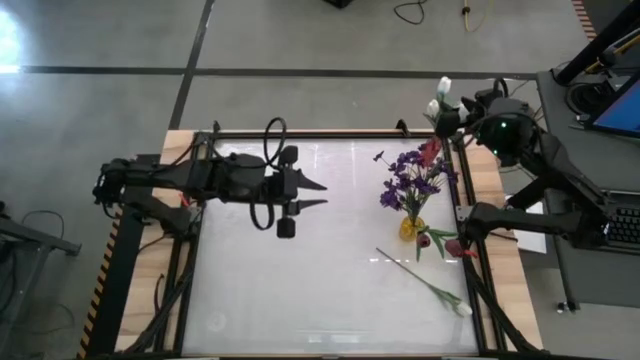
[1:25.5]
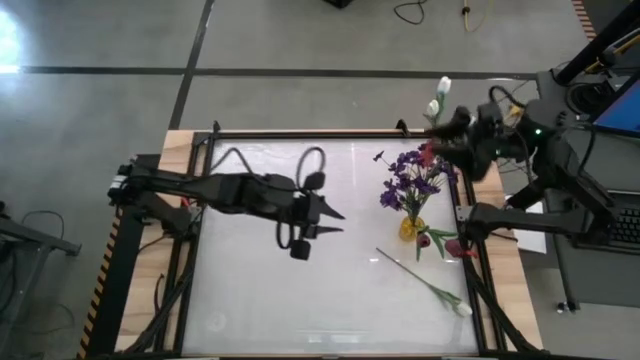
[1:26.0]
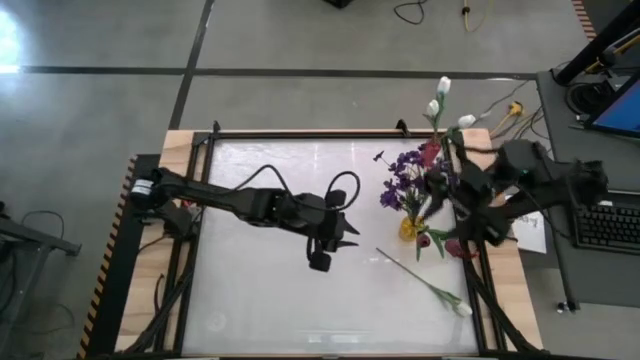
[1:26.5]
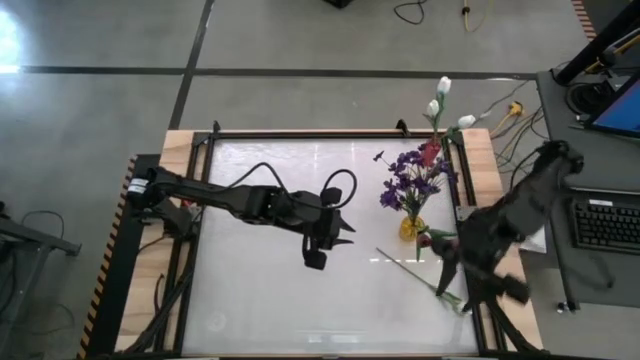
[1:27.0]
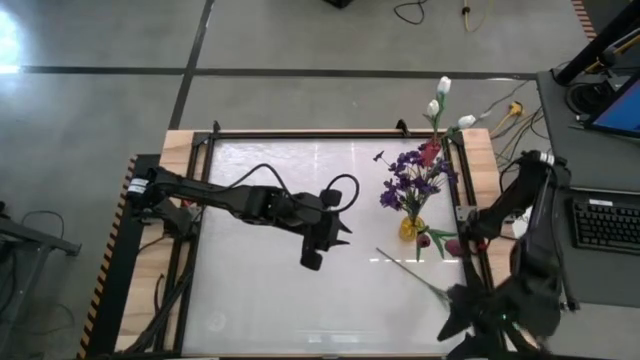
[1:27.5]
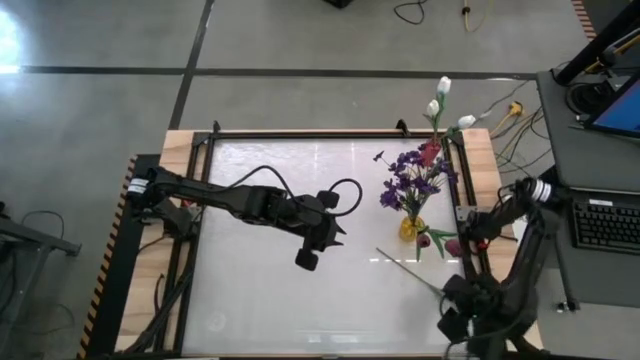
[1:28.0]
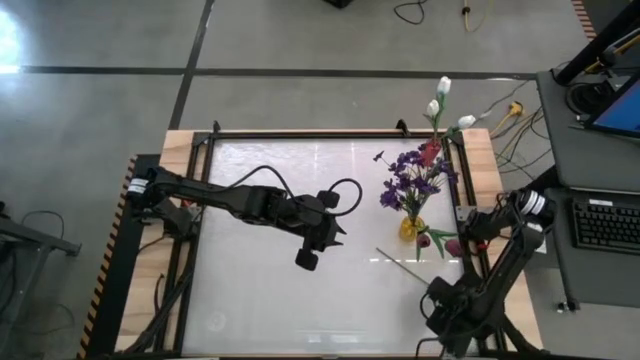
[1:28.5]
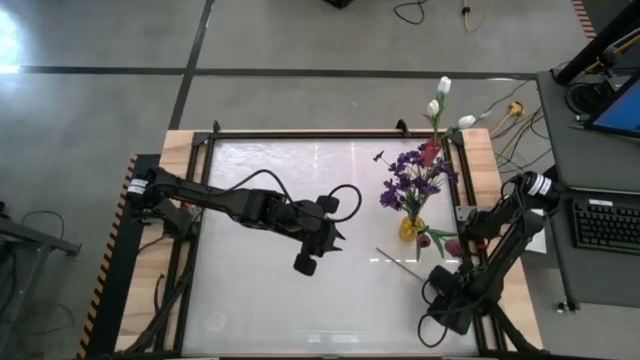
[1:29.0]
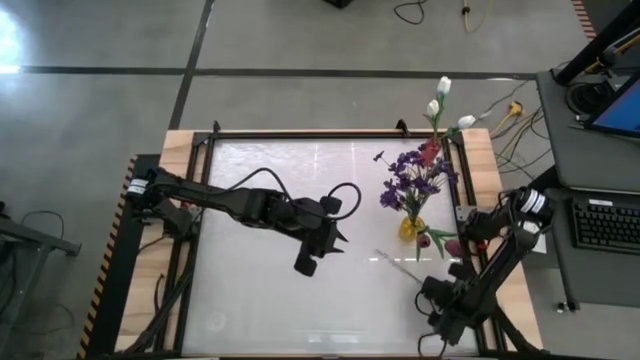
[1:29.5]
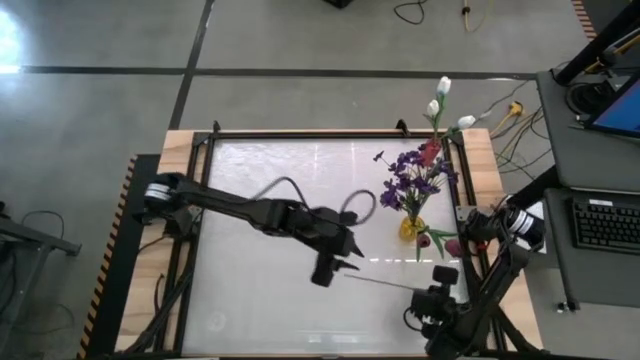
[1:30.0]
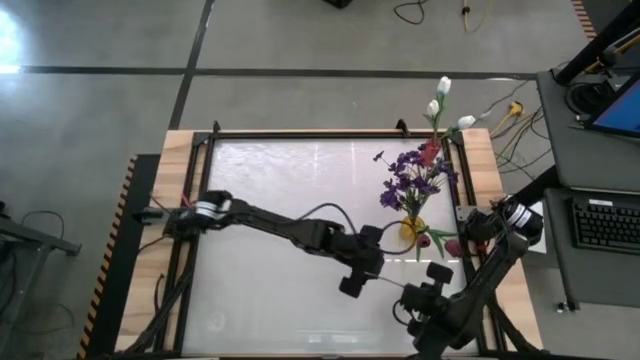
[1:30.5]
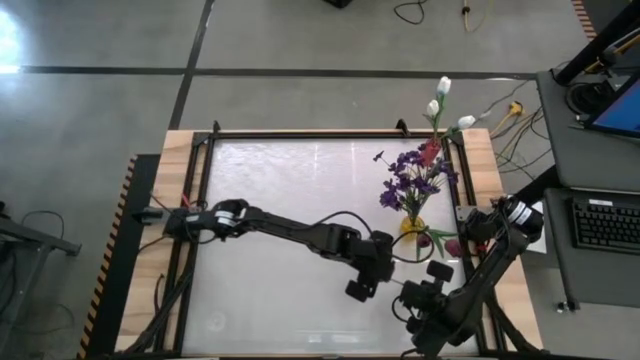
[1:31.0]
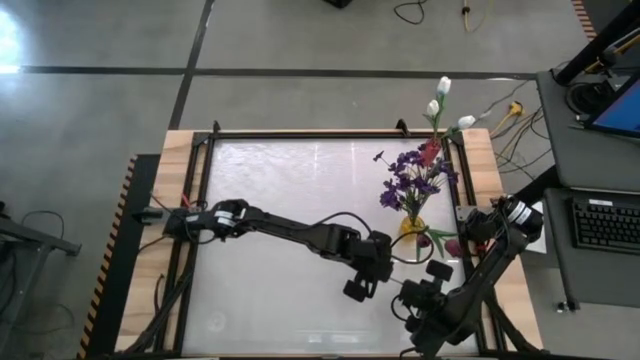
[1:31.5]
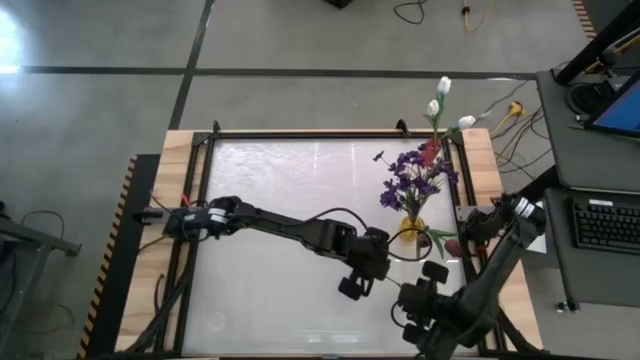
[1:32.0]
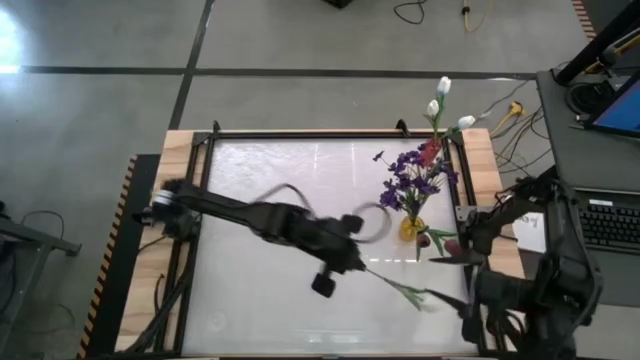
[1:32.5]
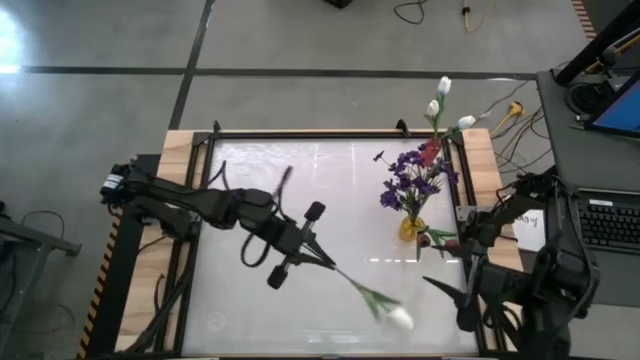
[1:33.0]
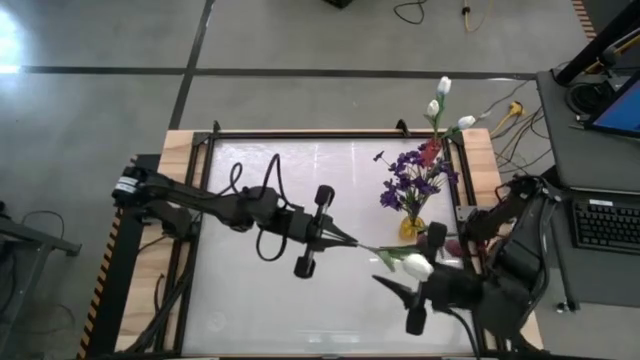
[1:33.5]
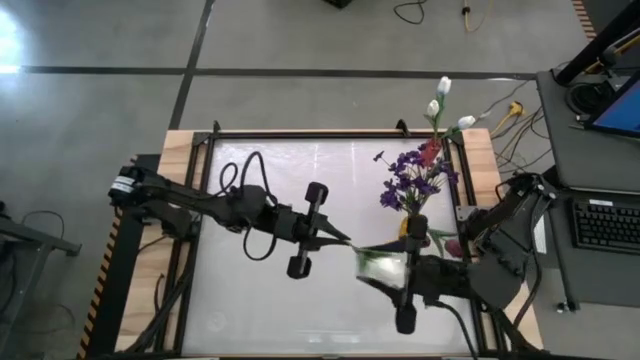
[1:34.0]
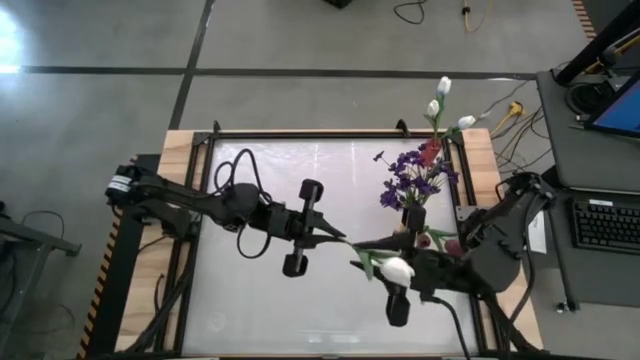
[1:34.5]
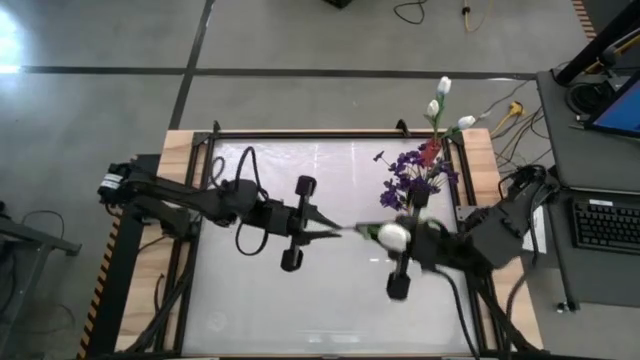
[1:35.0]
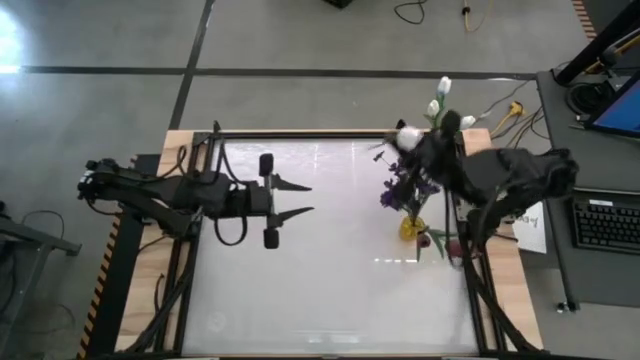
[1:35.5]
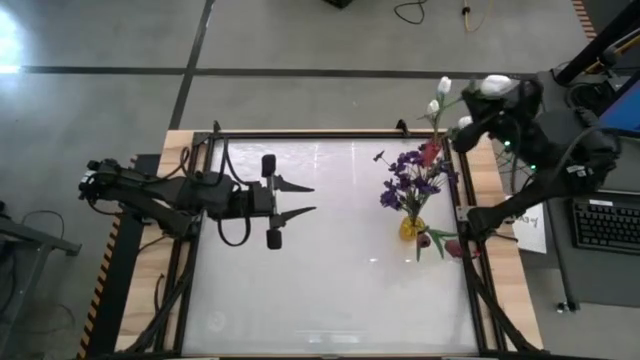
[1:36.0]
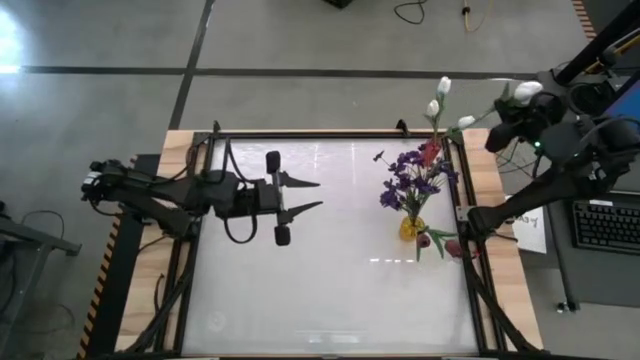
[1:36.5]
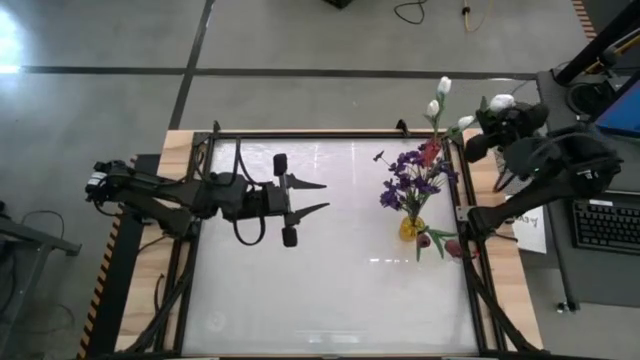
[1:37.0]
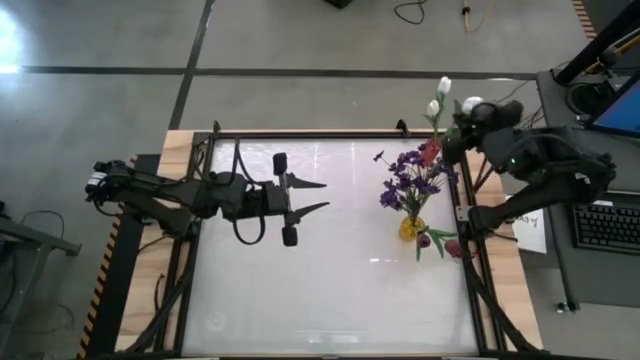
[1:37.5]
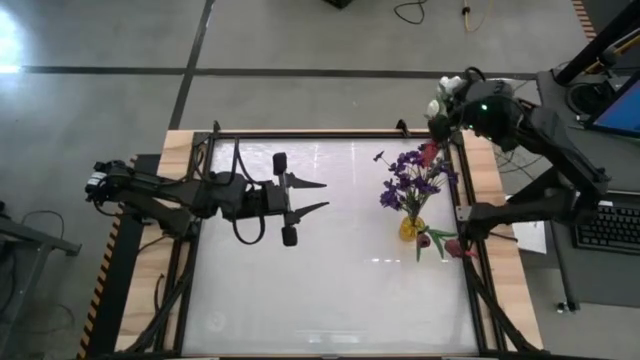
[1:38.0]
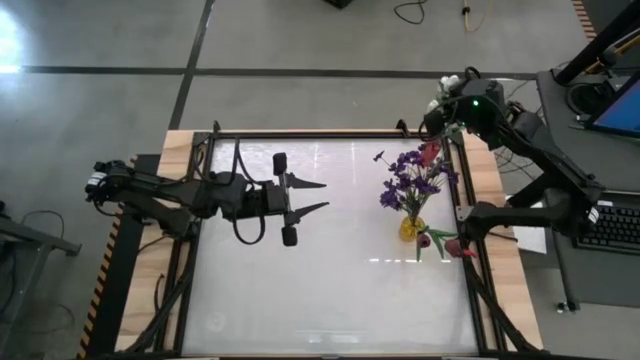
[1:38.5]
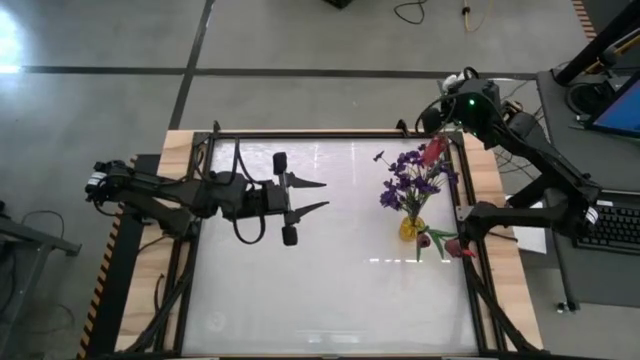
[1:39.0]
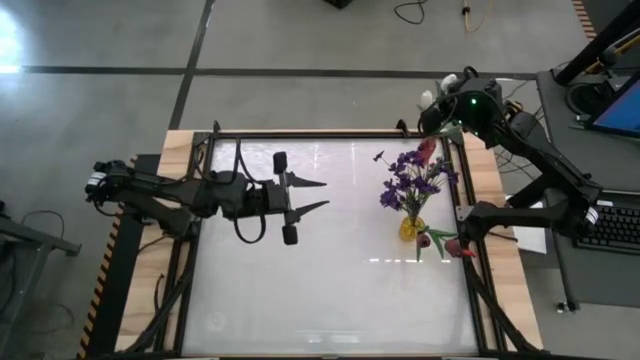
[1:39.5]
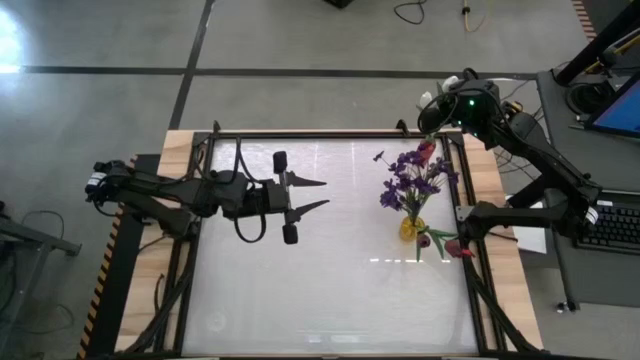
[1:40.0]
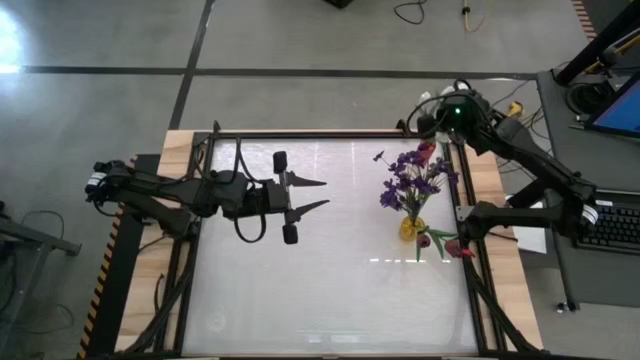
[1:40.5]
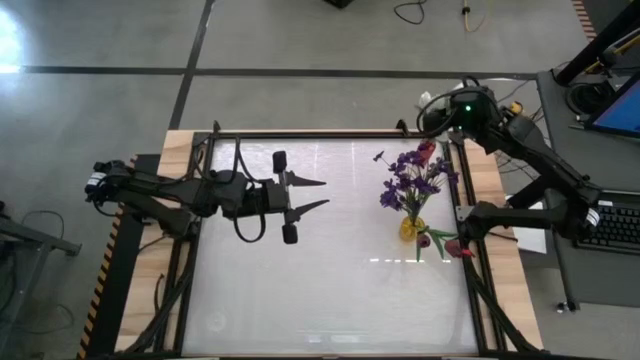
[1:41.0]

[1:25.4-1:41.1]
Task: Sort flowers into vase by color
Put the white flower into the red vase
